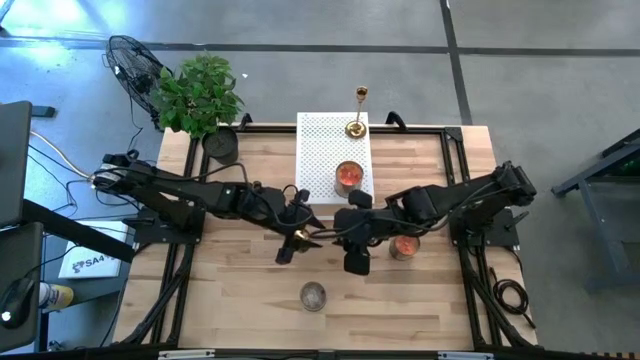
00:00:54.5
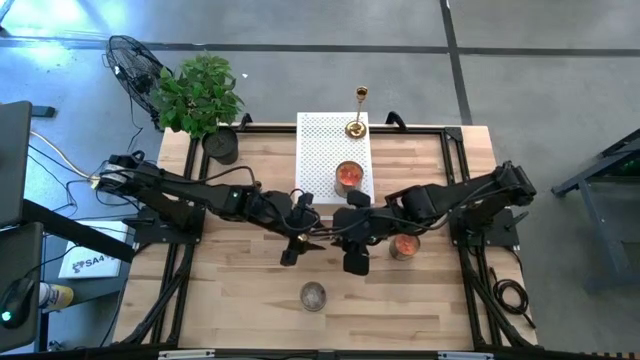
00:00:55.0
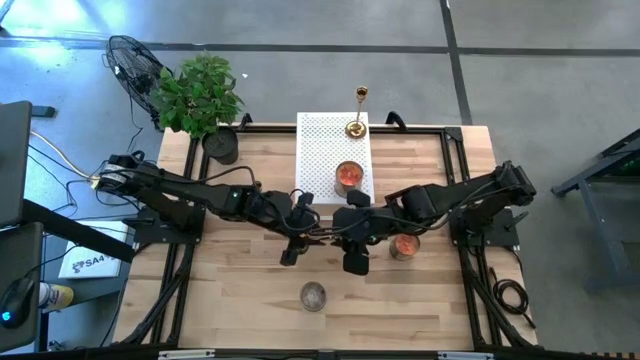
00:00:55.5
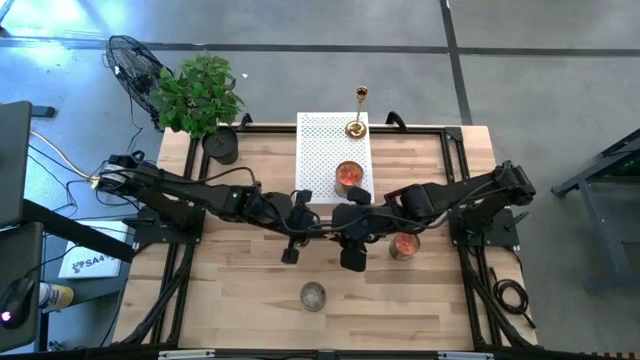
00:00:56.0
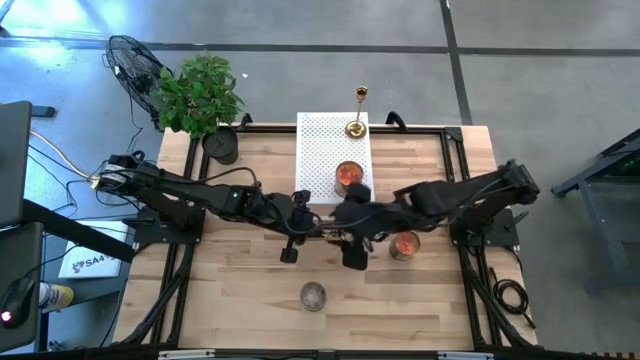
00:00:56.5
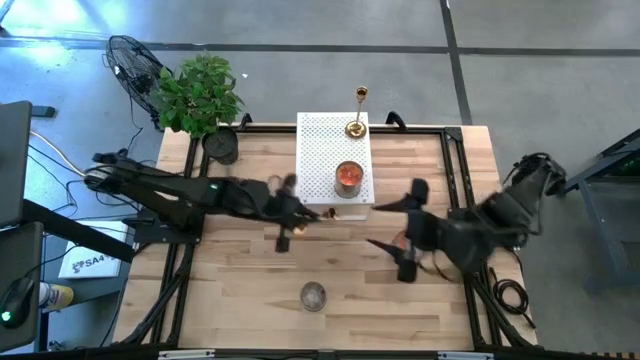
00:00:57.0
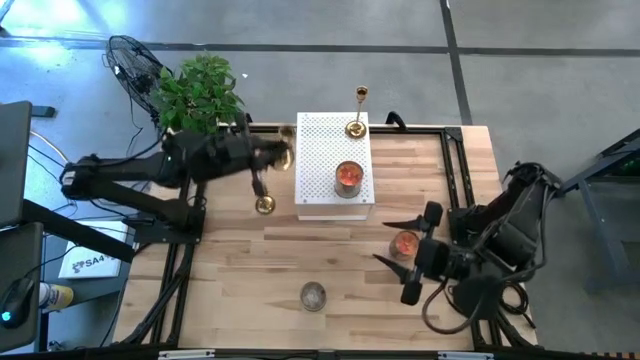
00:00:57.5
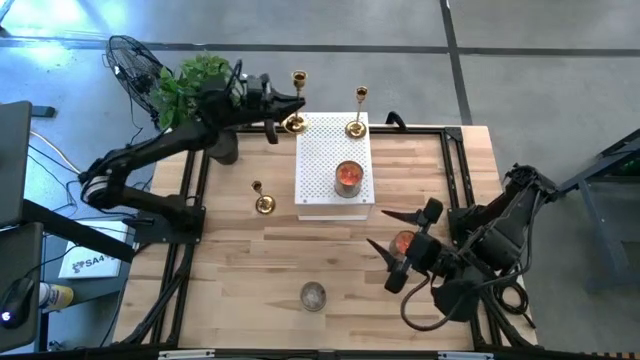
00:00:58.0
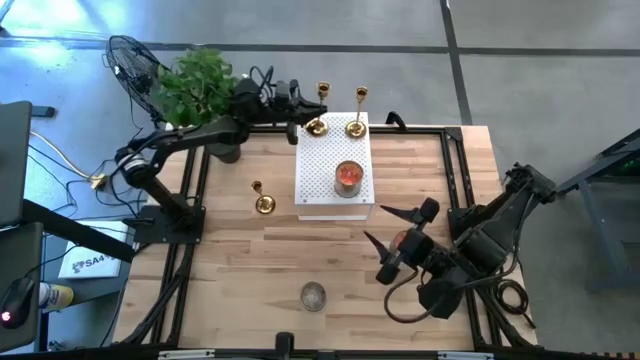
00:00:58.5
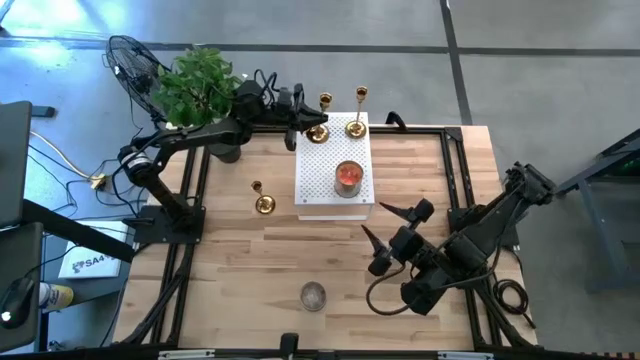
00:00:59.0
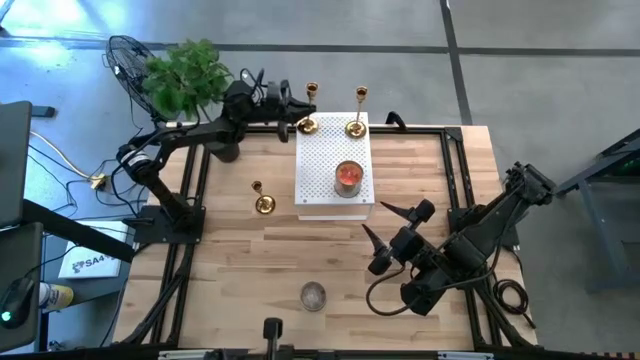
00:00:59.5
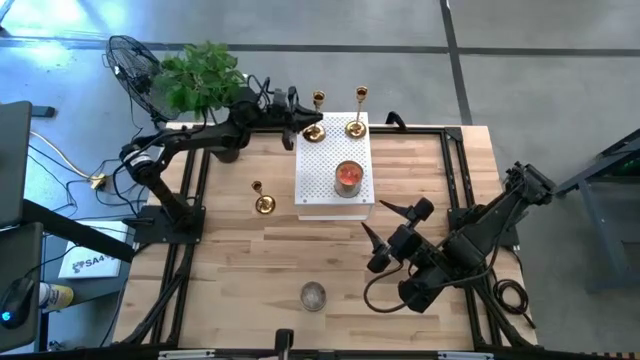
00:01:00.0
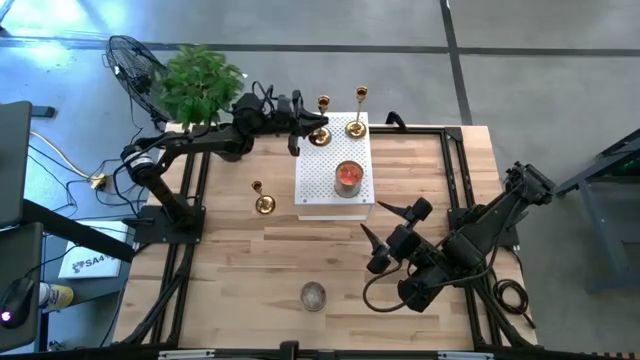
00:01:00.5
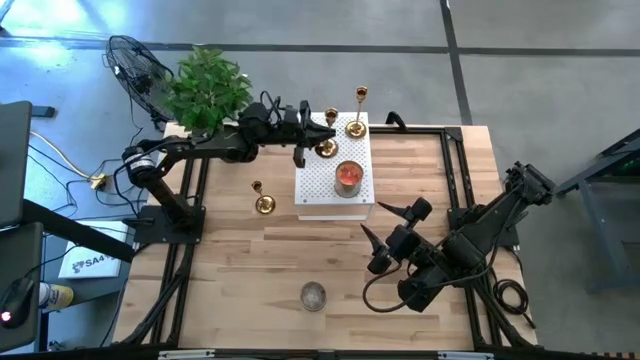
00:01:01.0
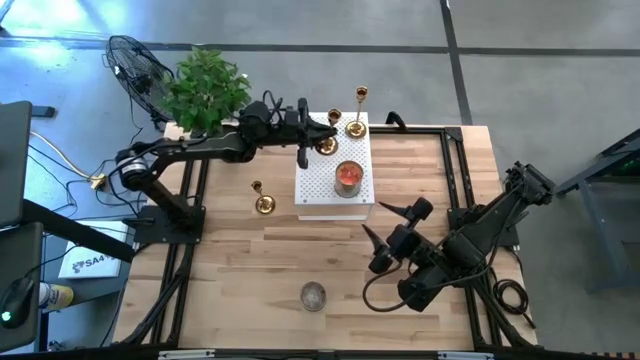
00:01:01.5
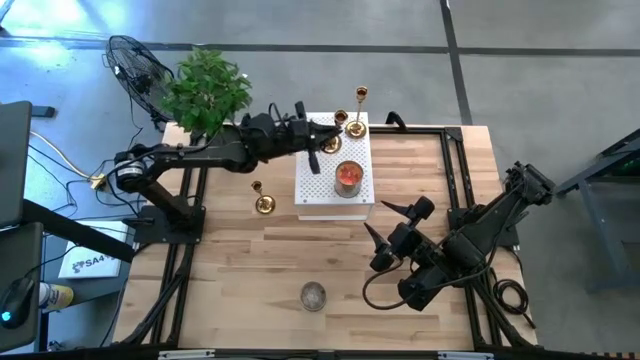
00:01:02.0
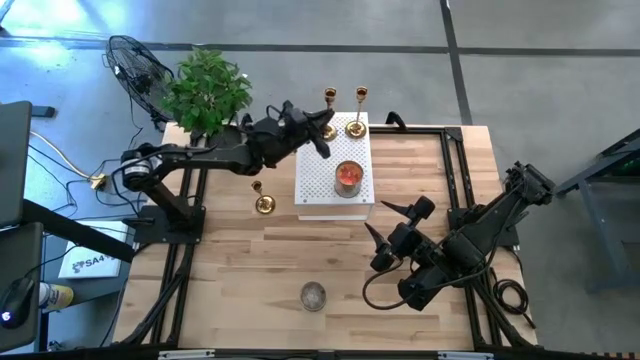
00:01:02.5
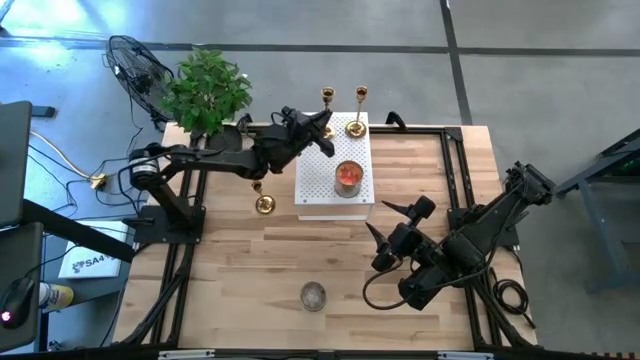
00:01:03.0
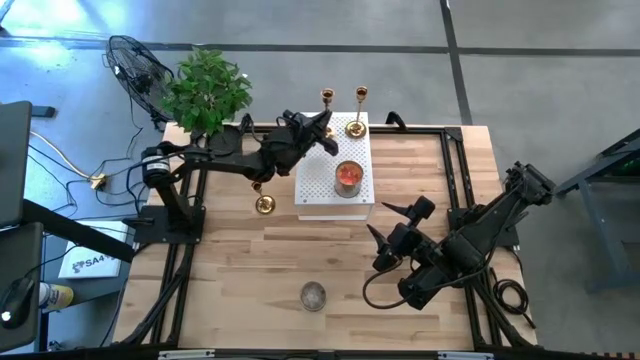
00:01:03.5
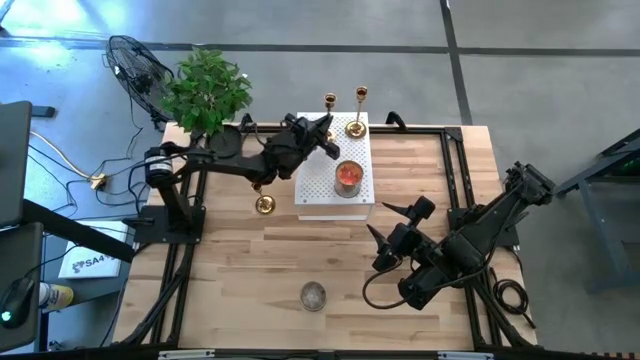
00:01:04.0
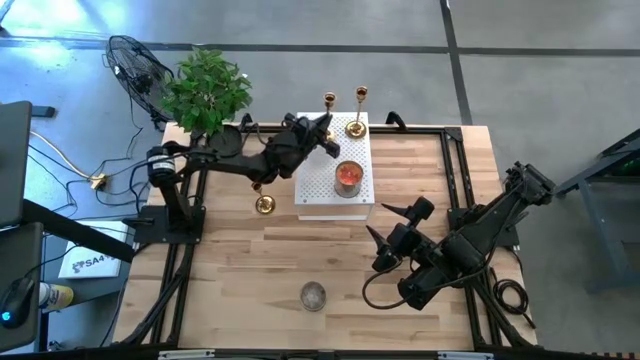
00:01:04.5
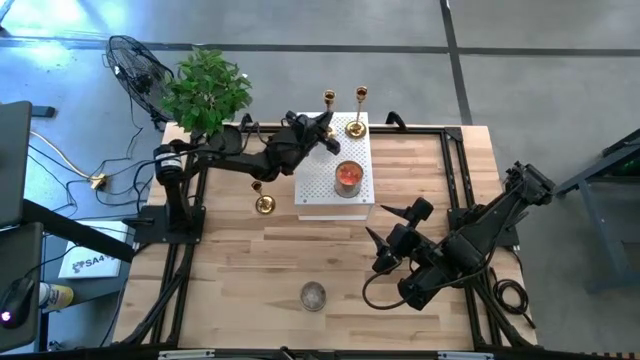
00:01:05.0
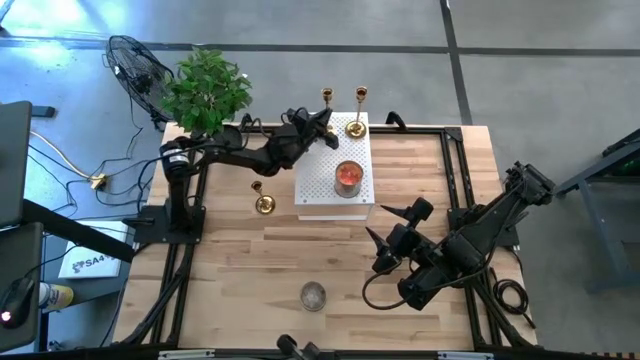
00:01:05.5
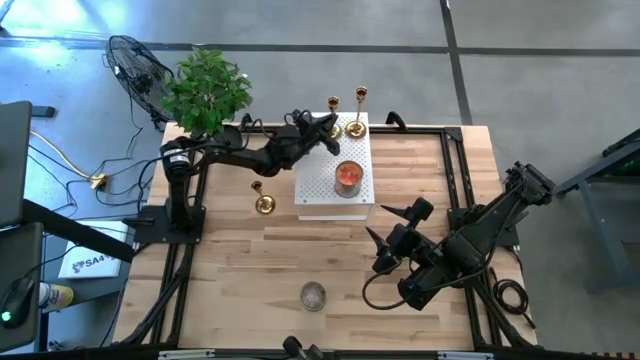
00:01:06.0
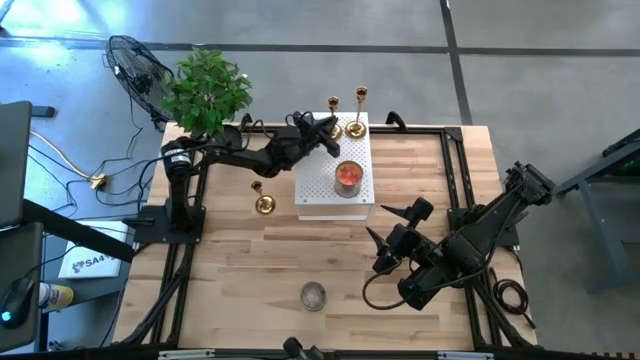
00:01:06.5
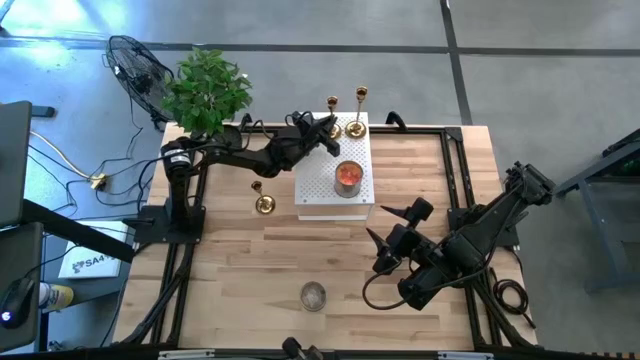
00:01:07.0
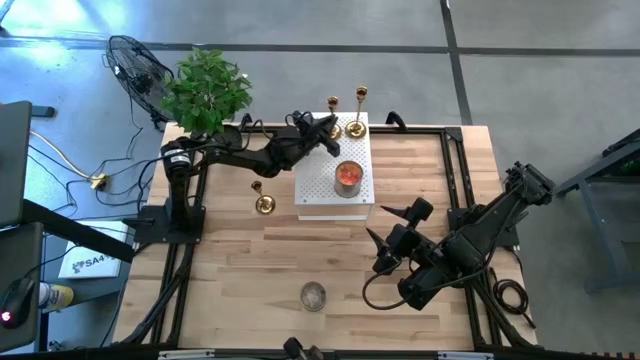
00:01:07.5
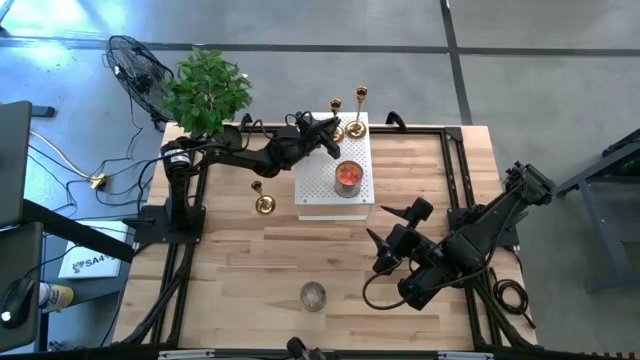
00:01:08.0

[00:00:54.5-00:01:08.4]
Task: Pick & Place candle stick holders
Put the bottom golden candle holder on the shelf

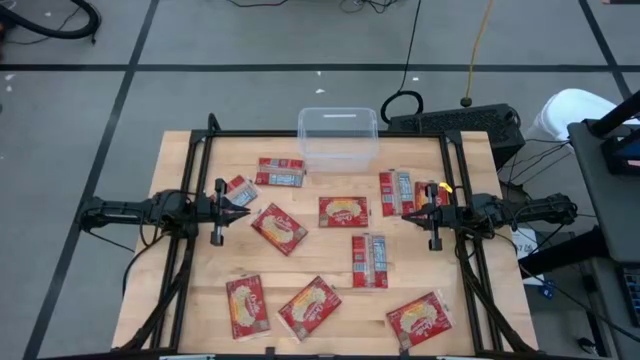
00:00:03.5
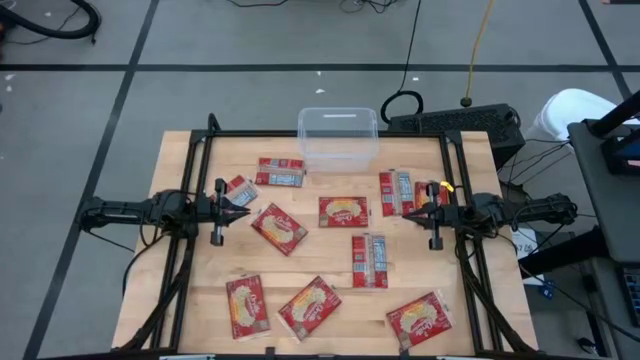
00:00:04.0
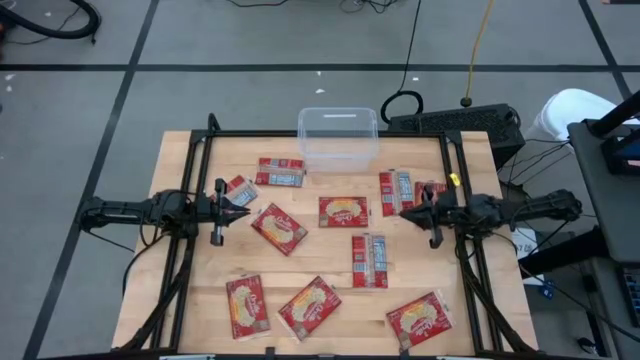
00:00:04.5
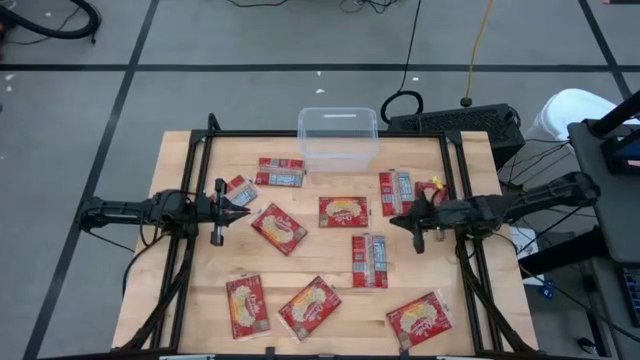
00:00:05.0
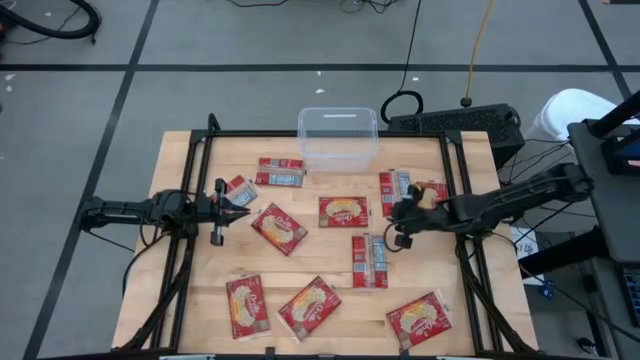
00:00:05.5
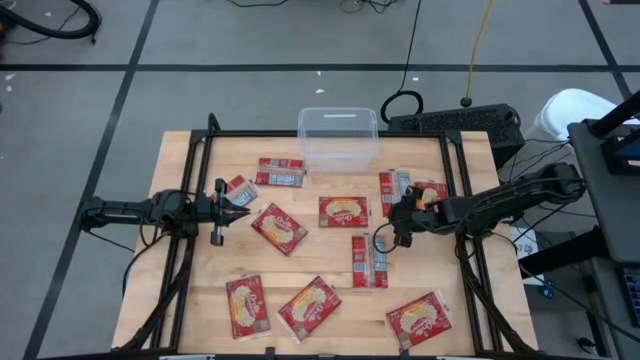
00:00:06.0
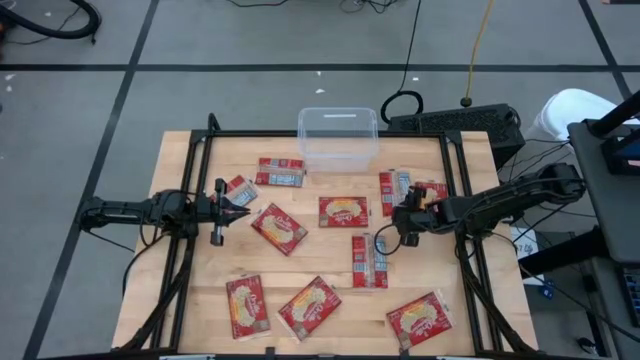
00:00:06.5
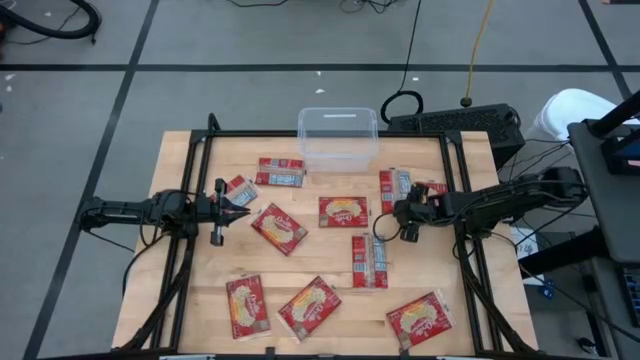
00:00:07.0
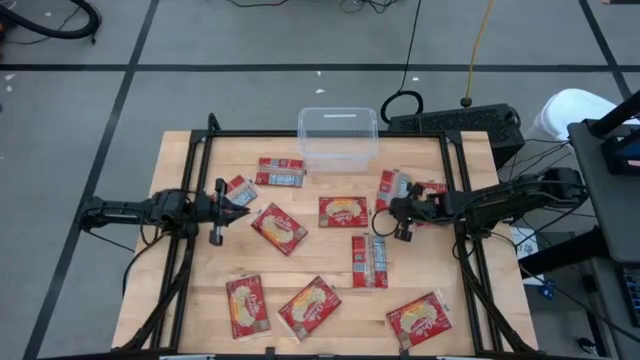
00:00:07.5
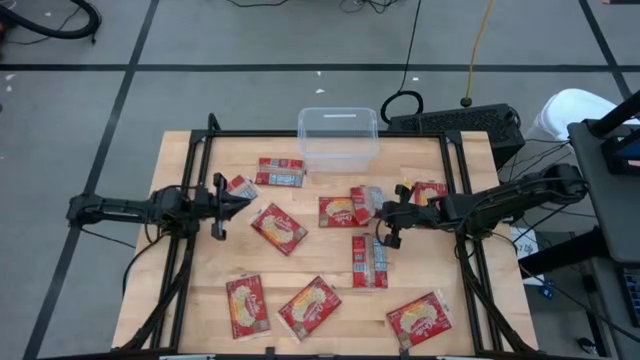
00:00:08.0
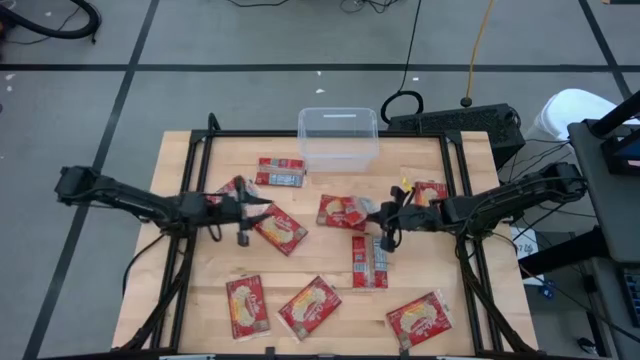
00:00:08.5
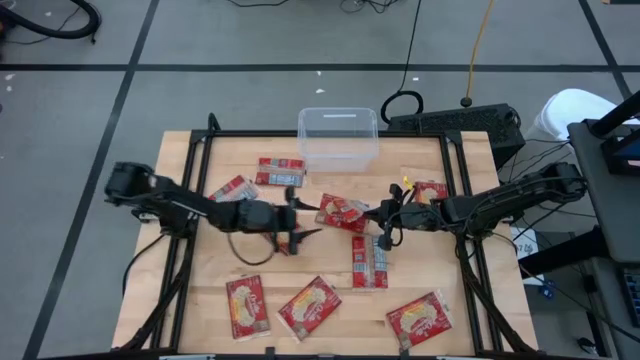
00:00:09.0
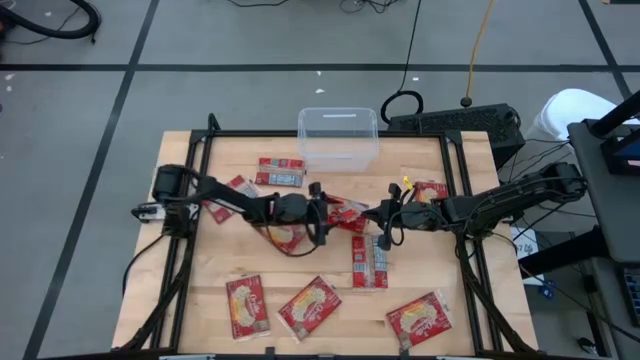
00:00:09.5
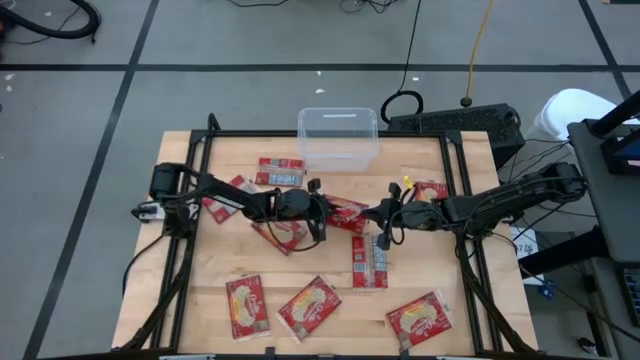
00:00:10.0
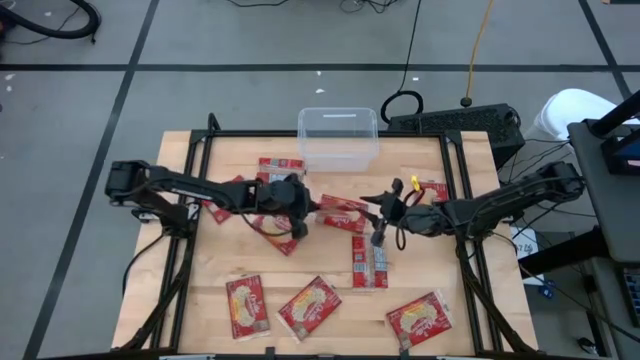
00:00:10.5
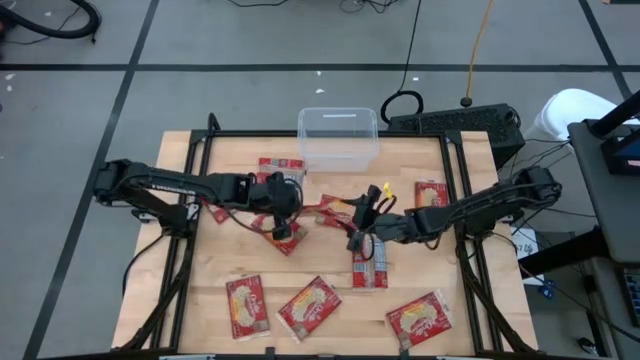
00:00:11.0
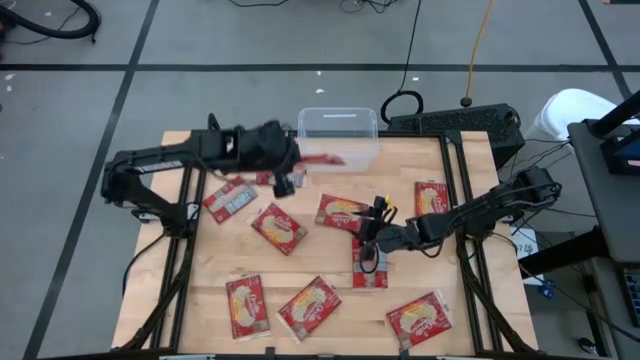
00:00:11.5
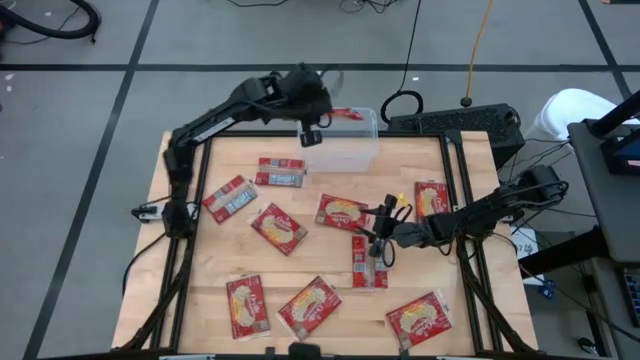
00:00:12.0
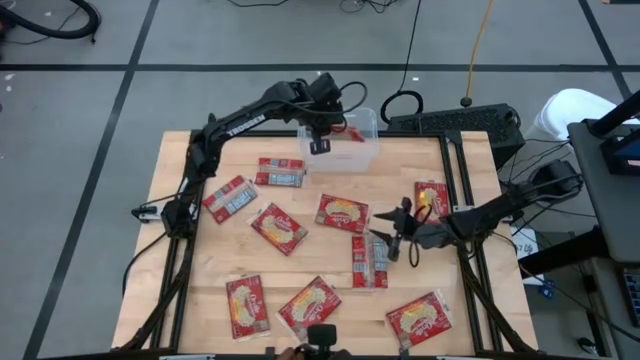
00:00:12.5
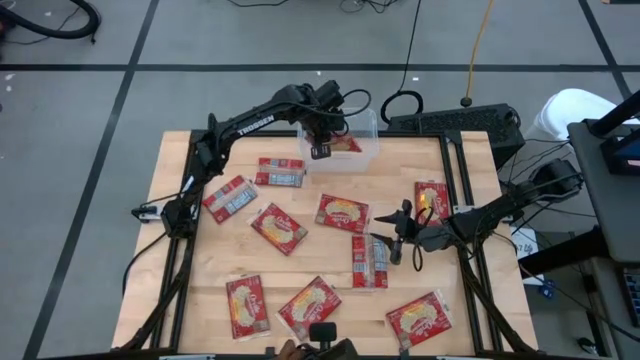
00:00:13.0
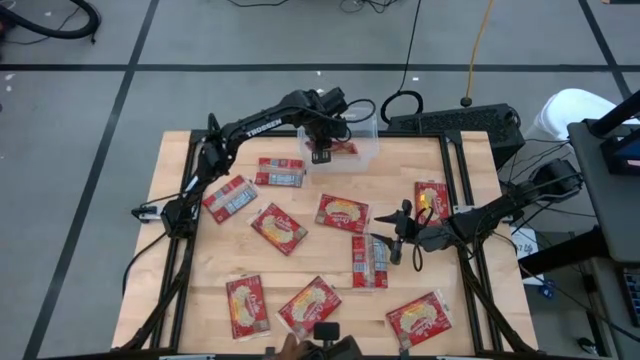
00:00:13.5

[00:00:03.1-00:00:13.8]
Task: Sort popcorn bags into baskets
Put the popcorn bags into the transparent bin
